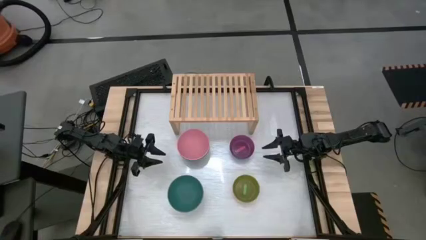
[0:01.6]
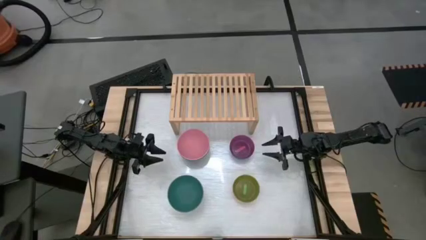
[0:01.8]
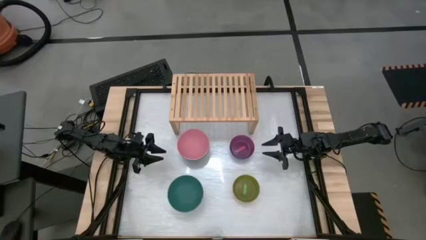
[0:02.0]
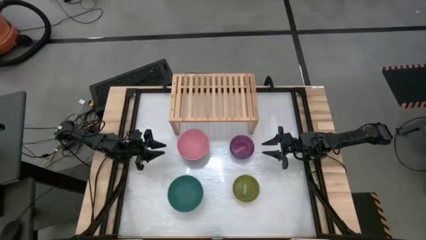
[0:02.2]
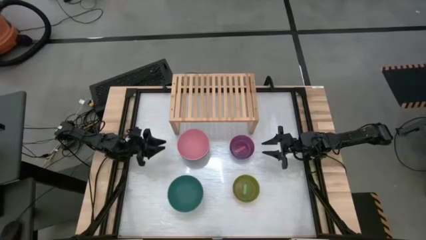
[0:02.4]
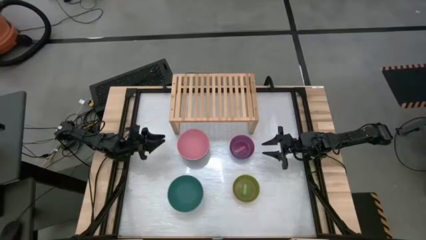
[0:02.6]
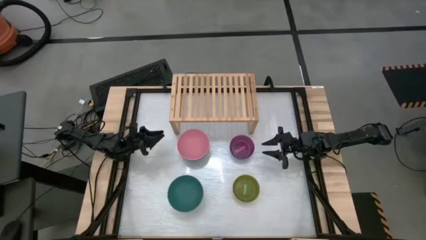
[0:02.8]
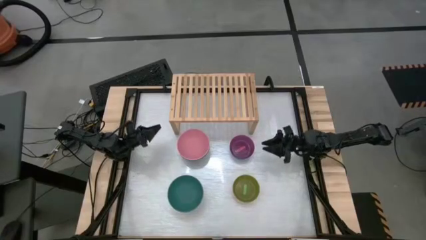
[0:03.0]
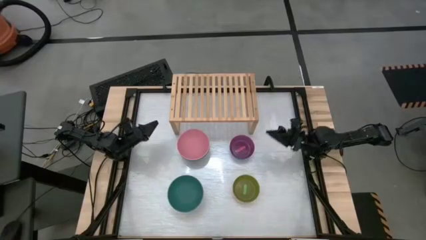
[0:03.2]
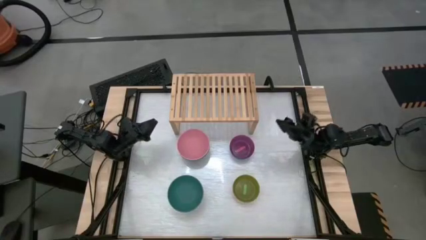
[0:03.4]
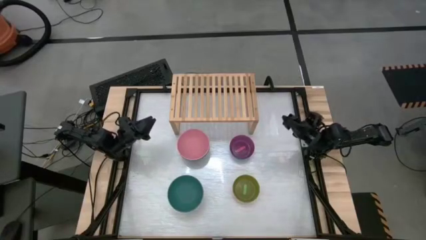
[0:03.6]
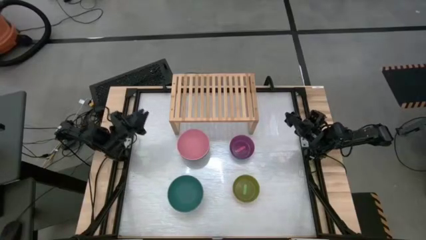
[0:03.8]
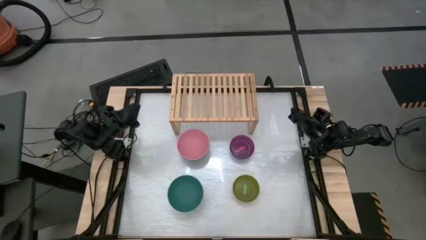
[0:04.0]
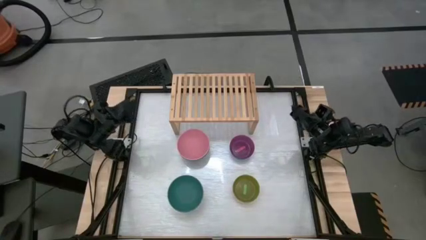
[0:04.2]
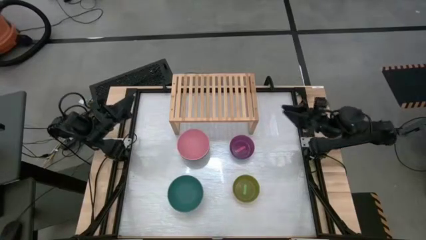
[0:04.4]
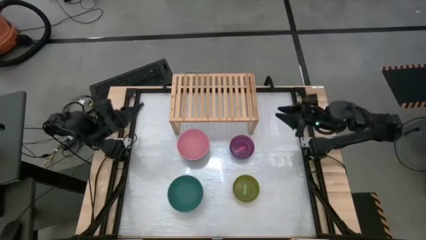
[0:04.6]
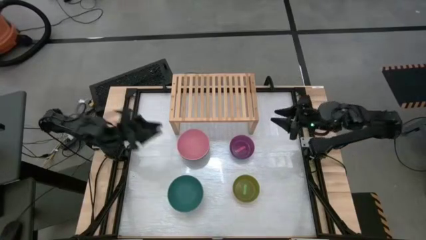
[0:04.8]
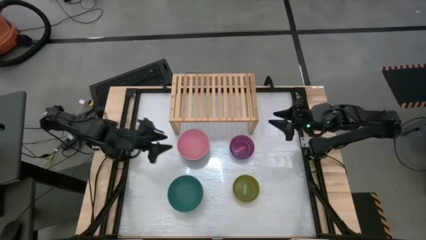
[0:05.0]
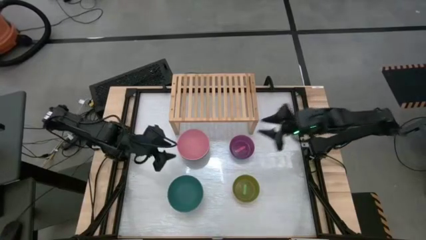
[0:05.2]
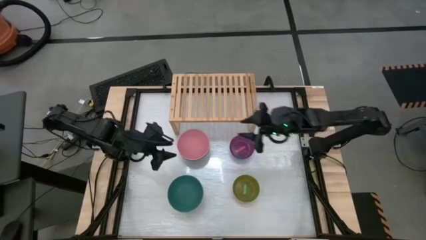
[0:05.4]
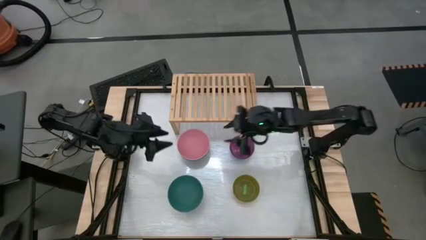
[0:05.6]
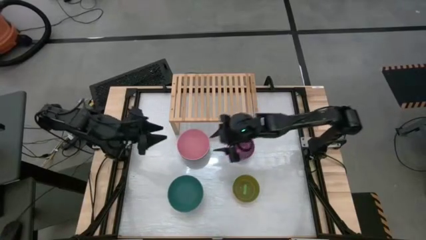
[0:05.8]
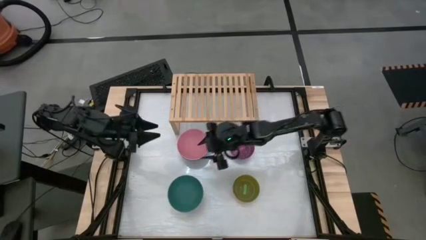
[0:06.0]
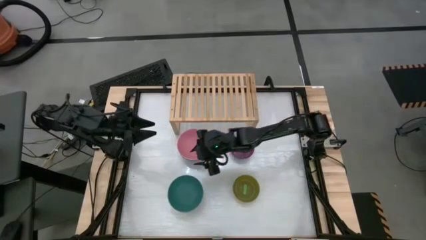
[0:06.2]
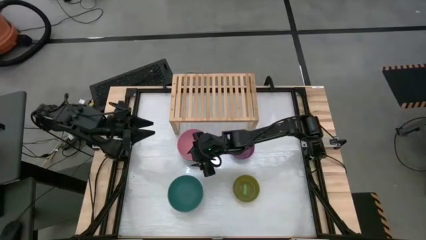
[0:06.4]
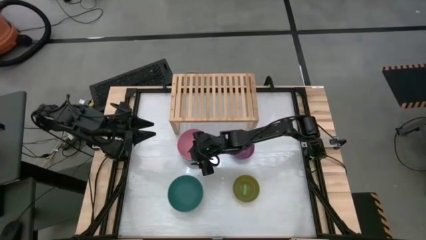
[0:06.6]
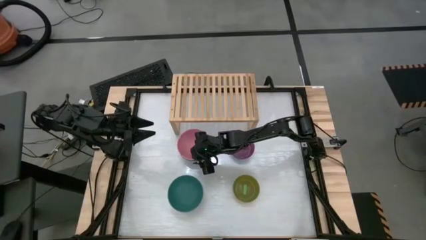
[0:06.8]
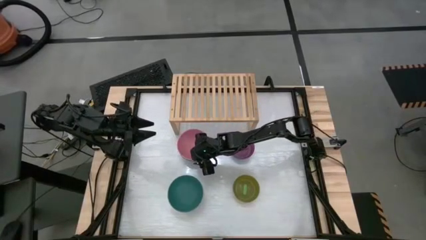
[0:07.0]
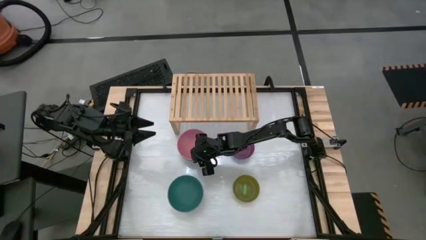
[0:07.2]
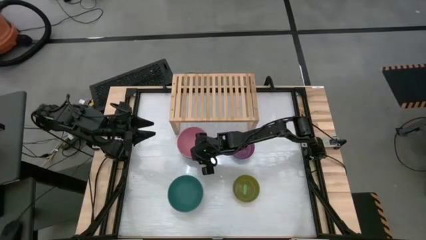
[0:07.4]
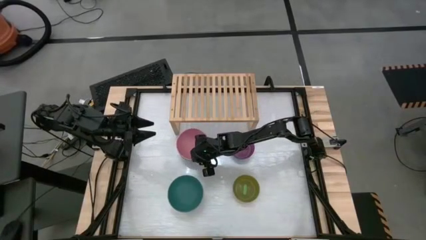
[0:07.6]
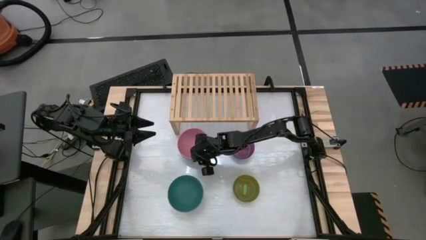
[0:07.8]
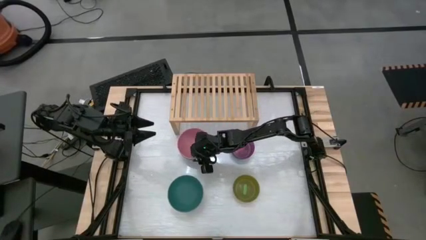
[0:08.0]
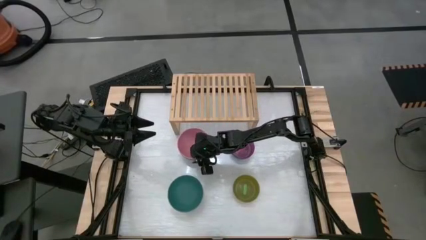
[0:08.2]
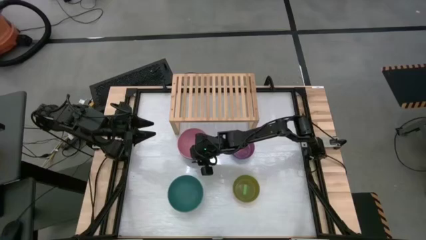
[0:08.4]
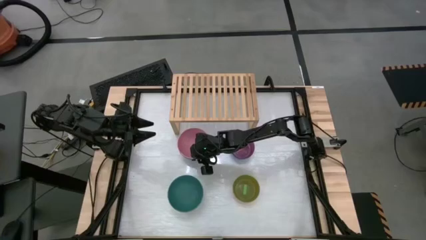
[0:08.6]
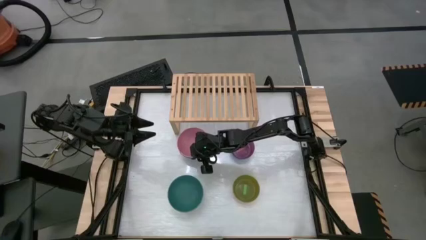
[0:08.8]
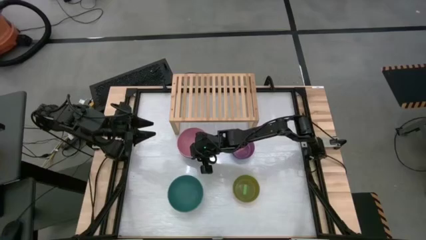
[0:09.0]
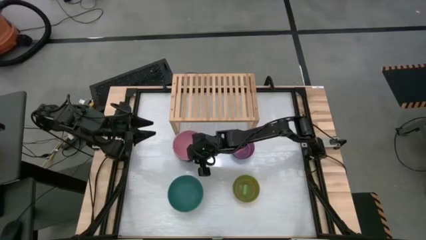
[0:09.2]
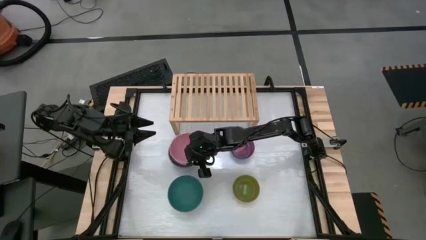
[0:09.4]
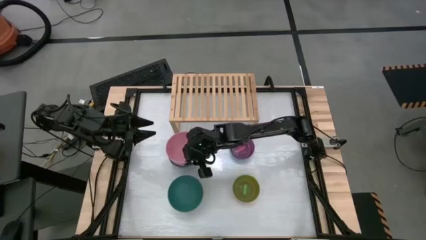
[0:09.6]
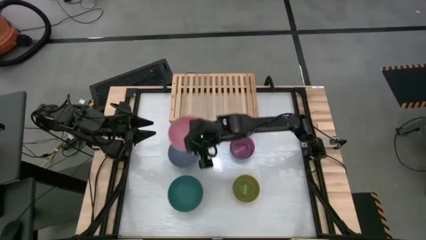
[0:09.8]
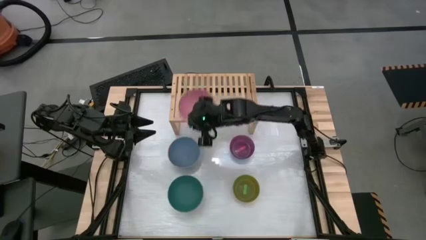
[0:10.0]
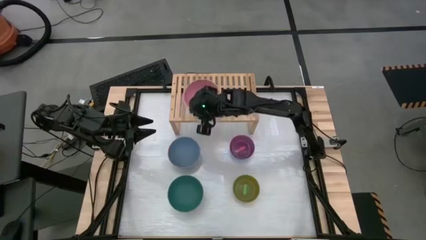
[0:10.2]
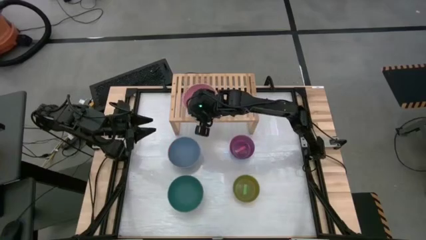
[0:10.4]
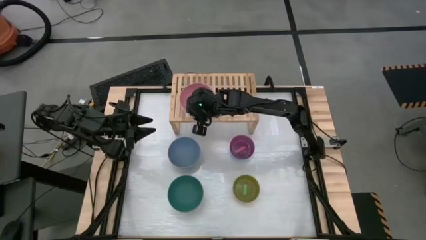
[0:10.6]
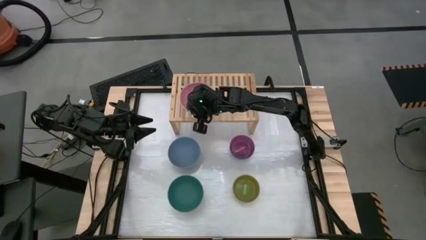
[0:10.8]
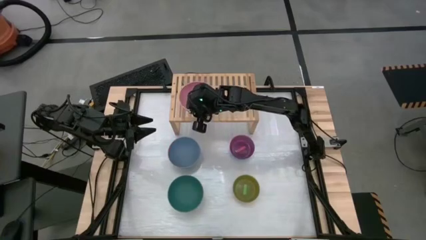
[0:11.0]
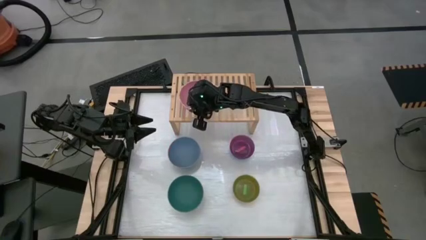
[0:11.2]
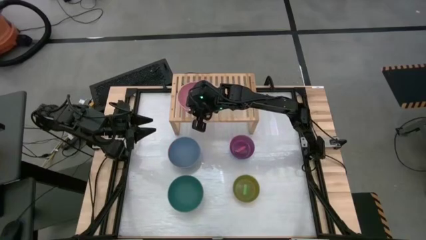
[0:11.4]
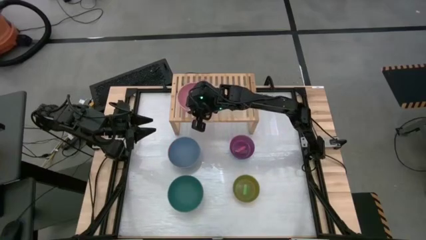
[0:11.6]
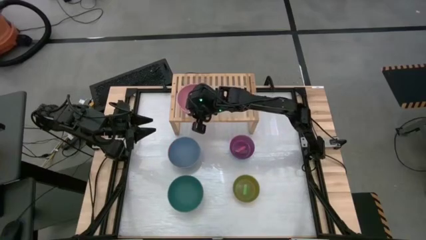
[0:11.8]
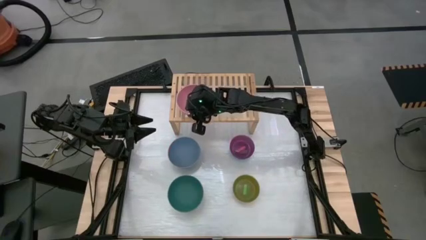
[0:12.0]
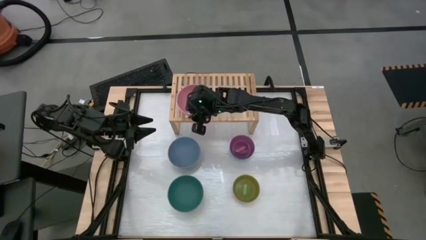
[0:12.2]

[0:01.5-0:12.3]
Task: Place and stack bowls onto a shelf
Put the pink bowl on the shelf

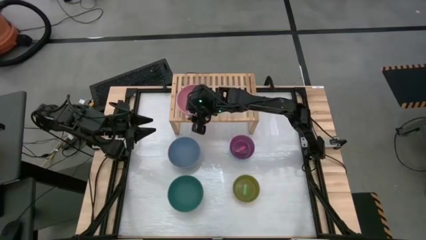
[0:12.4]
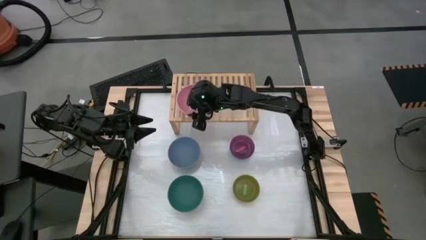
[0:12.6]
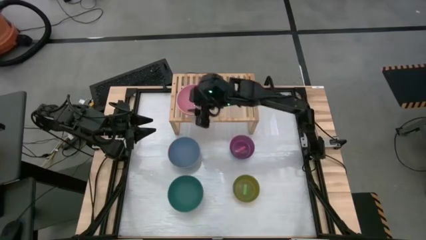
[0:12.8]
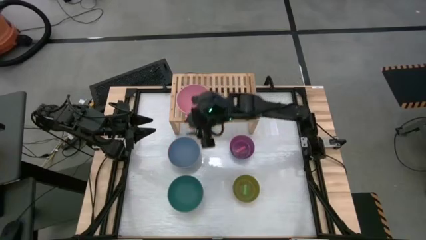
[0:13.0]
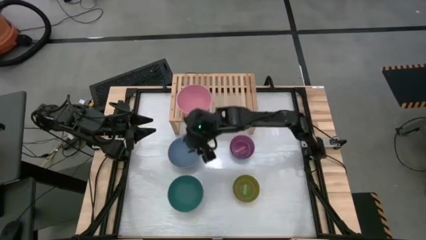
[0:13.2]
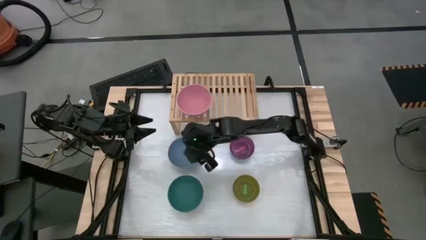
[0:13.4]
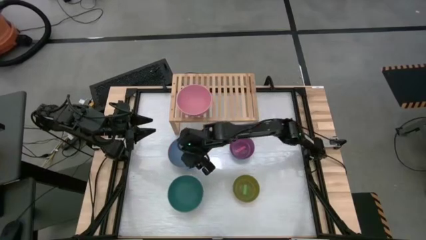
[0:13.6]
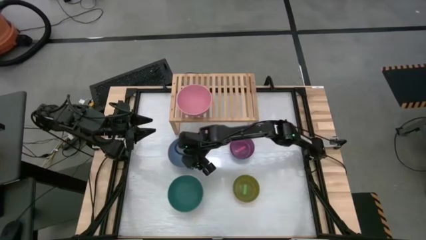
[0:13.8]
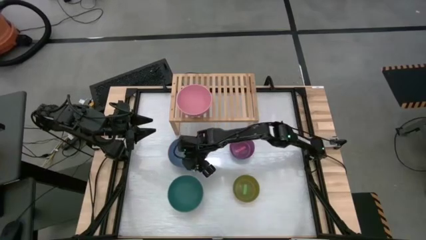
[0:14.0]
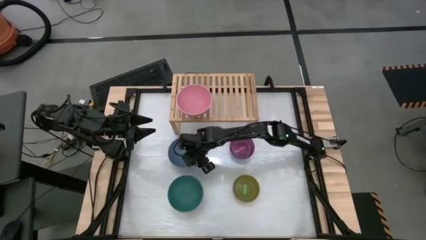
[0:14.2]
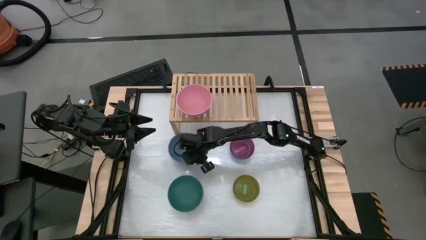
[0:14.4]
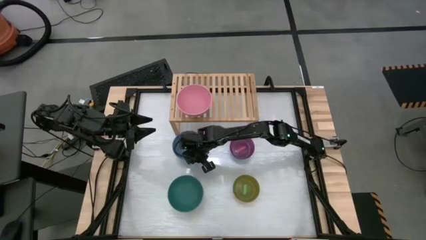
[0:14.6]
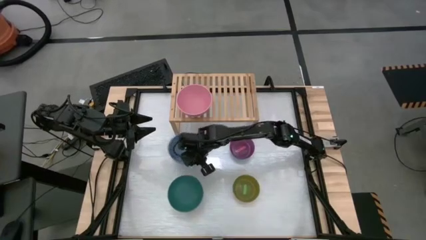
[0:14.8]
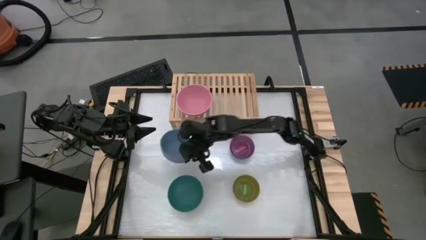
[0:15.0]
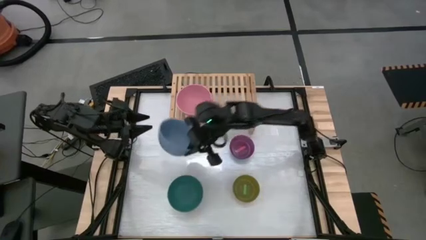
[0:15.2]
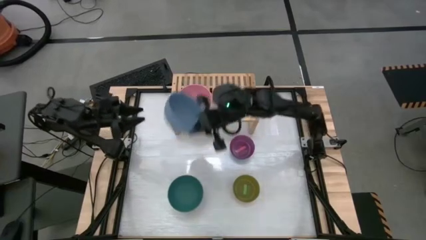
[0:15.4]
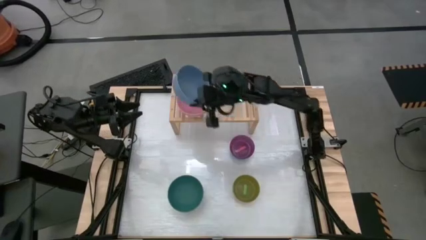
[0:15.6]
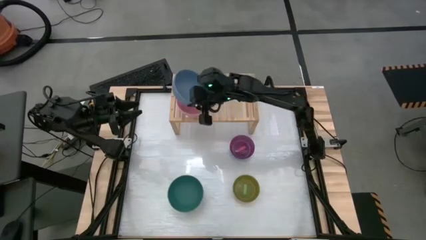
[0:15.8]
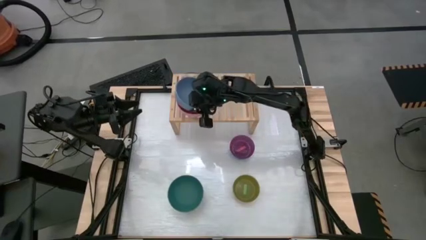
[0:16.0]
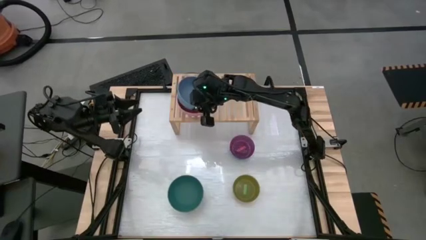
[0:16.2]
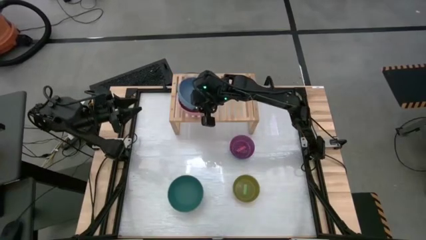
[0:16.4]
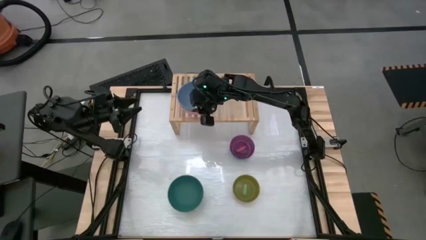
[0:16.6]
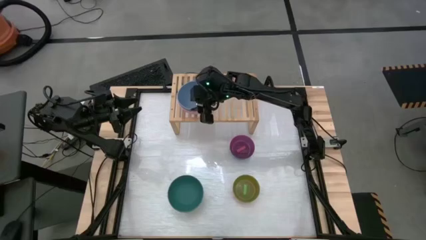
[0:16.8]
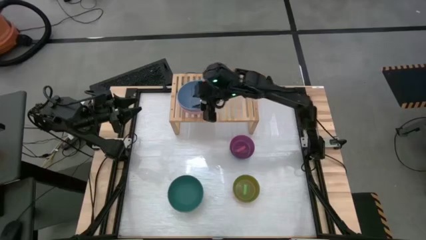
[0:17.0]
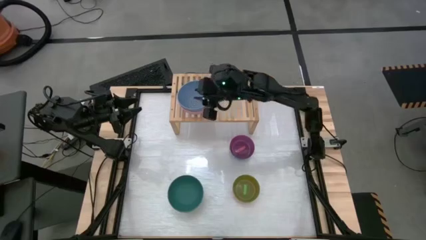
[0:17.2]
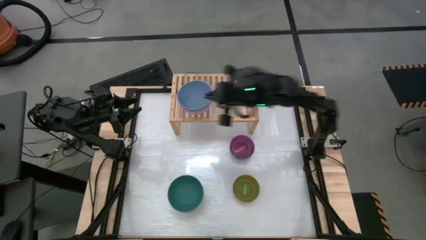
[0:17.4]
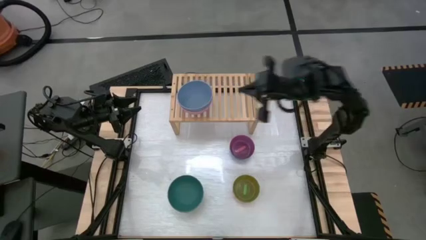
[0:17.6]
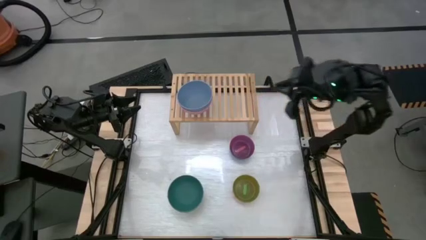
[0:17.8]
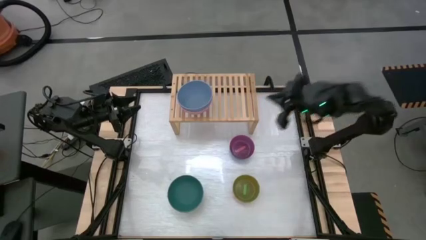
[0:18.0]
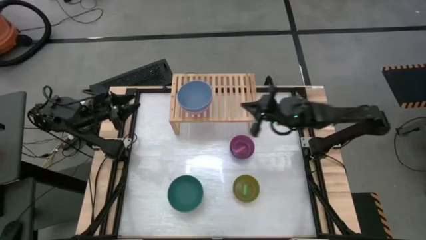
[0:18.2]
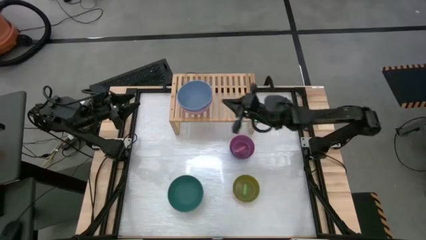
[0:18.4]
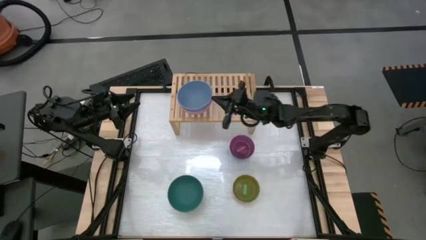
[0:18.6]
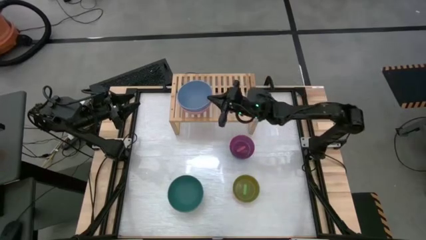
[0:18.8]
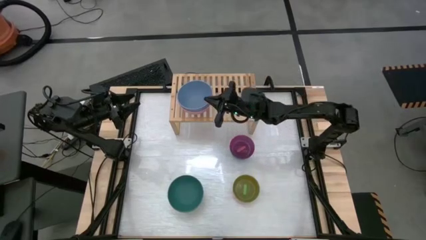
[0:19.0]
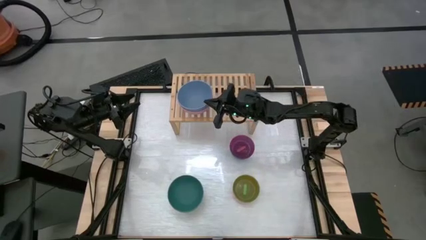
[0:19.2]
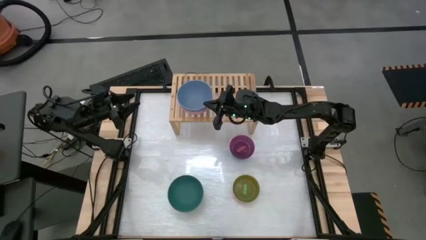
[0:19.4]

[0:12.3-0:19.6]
Stack the blue bowl on top of the pink bowl on the shelf
